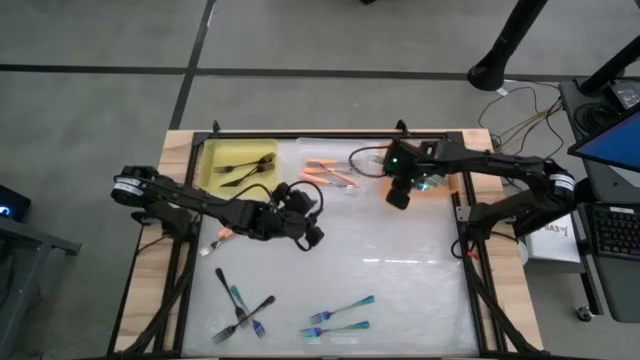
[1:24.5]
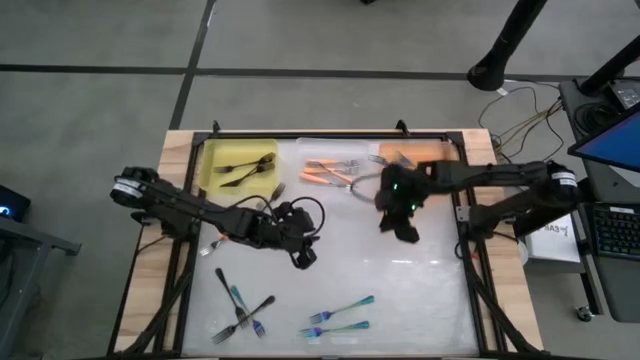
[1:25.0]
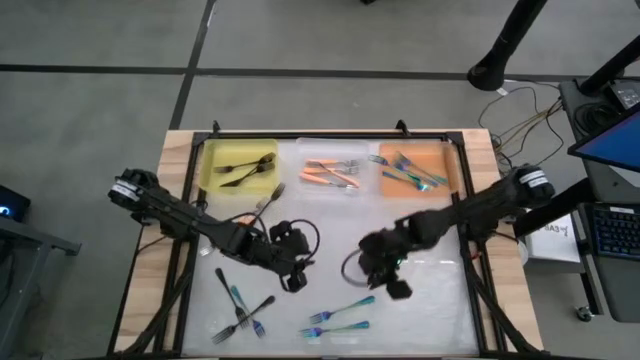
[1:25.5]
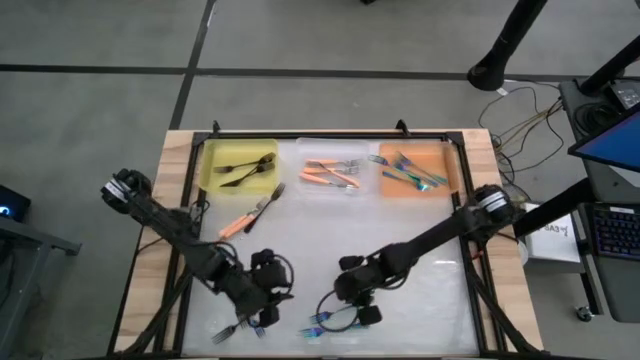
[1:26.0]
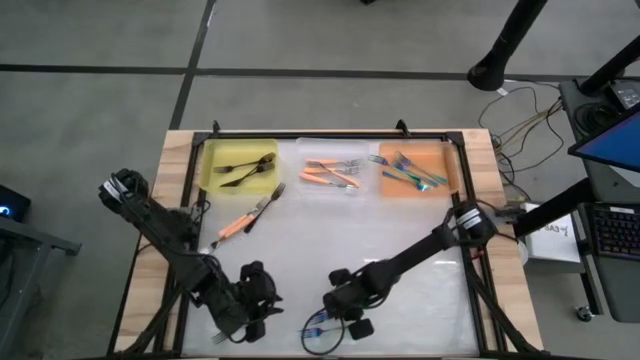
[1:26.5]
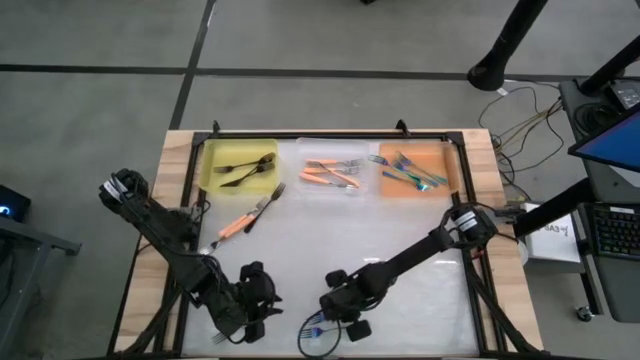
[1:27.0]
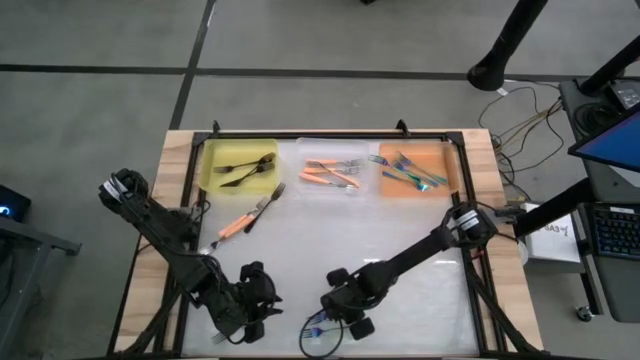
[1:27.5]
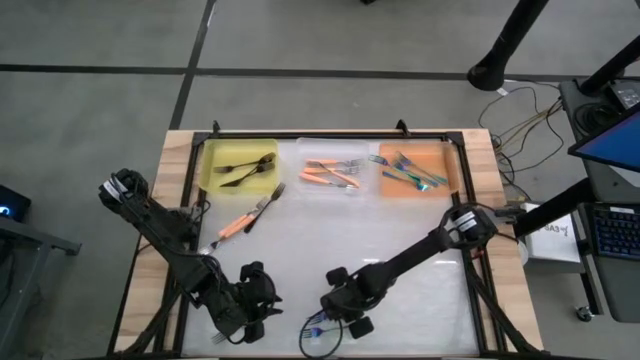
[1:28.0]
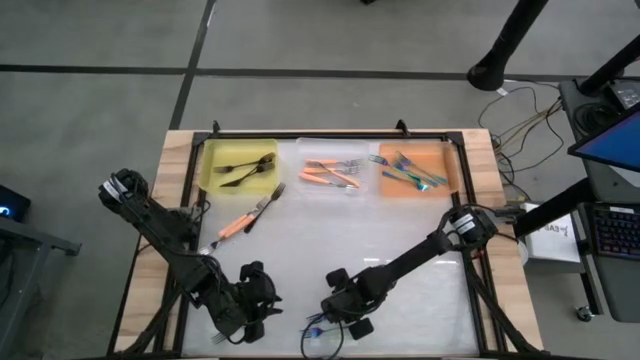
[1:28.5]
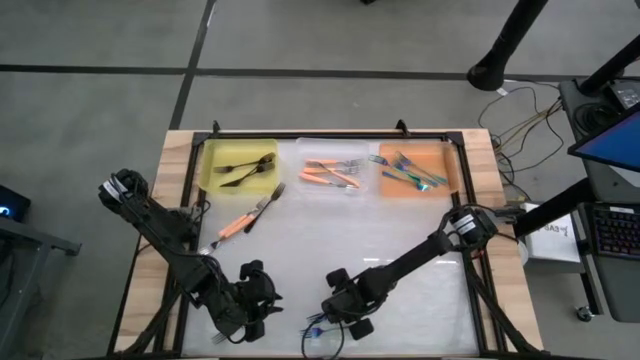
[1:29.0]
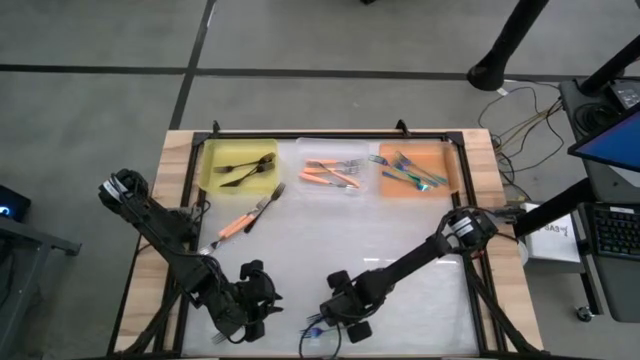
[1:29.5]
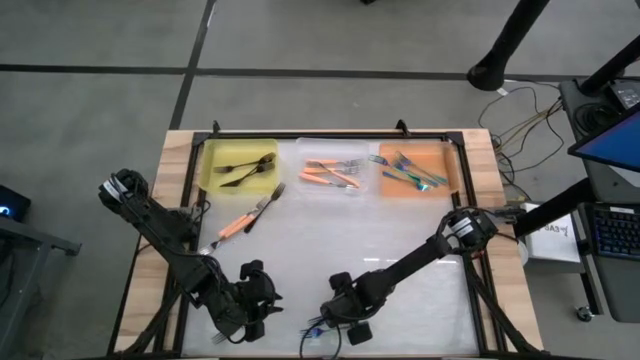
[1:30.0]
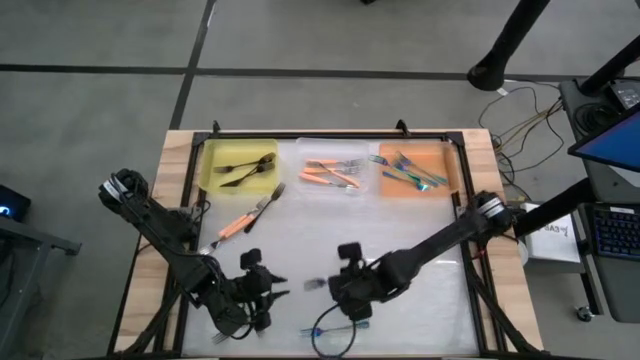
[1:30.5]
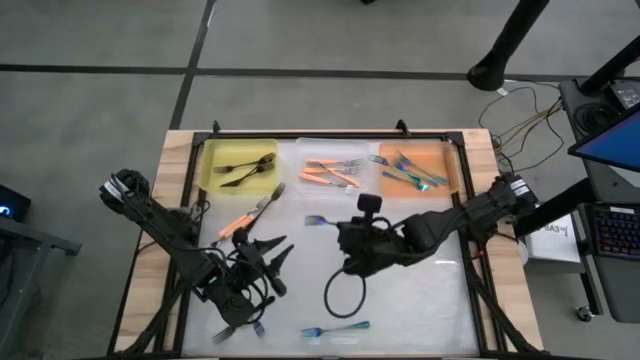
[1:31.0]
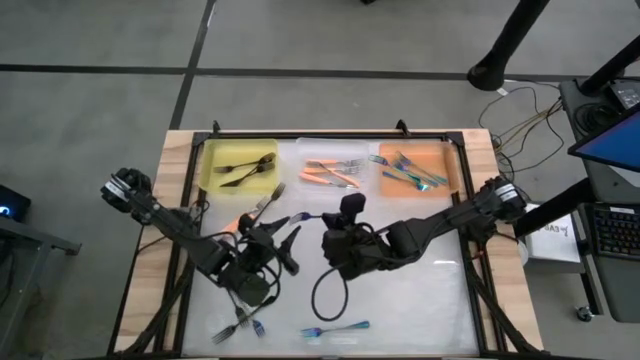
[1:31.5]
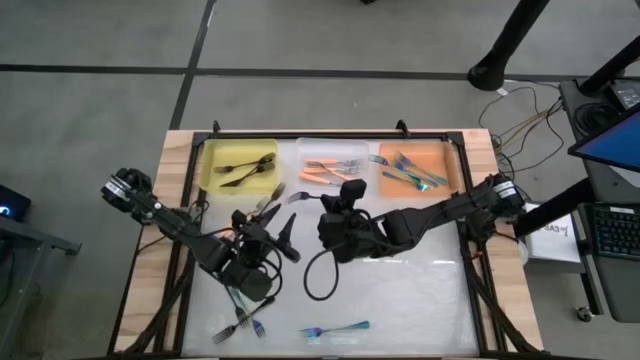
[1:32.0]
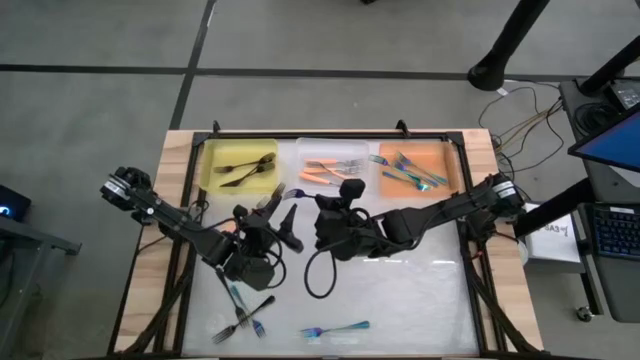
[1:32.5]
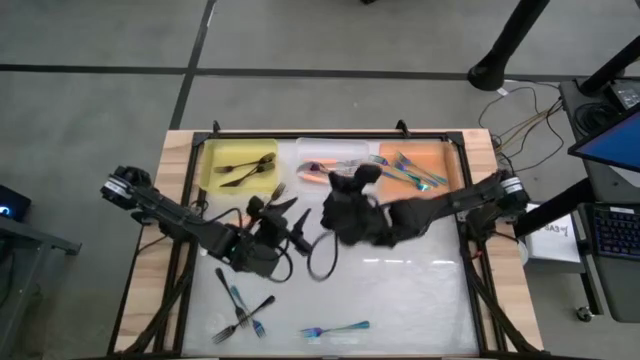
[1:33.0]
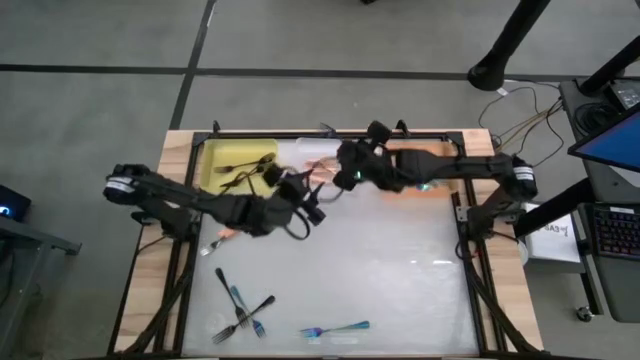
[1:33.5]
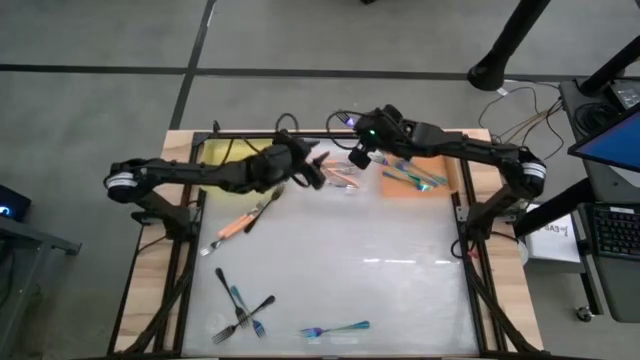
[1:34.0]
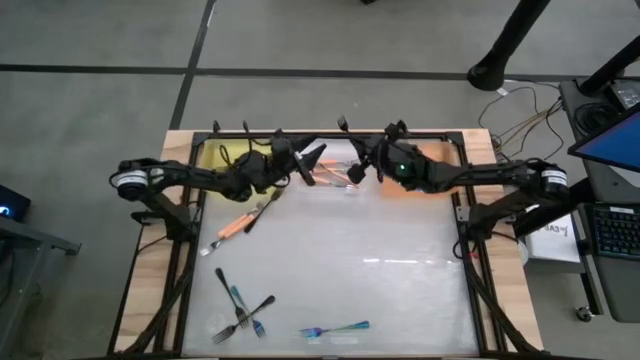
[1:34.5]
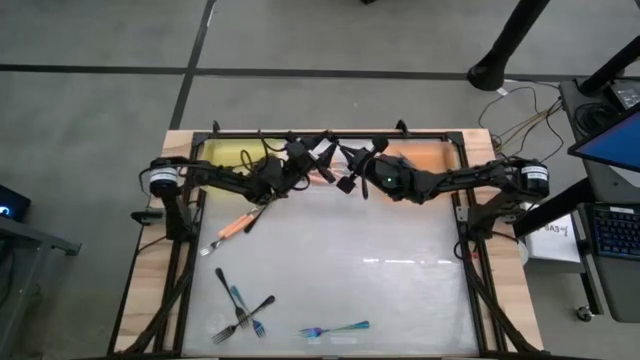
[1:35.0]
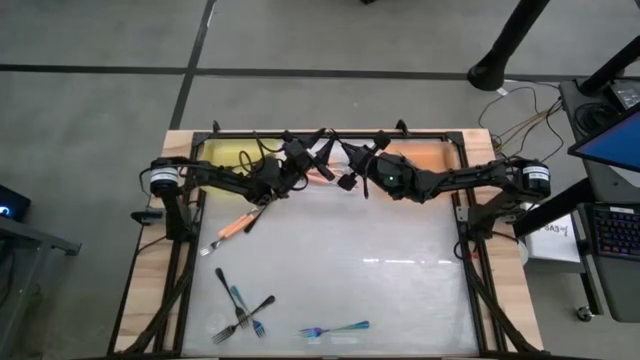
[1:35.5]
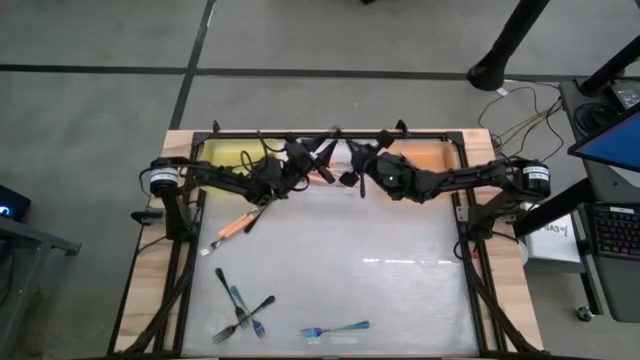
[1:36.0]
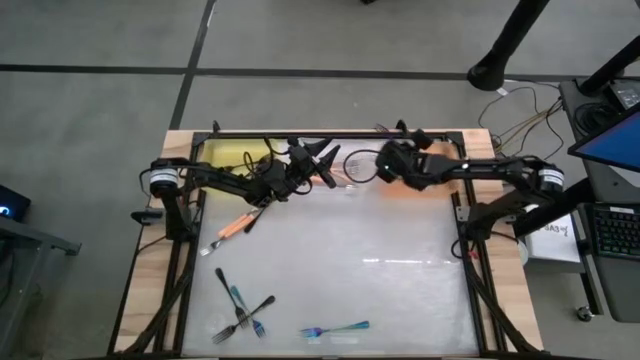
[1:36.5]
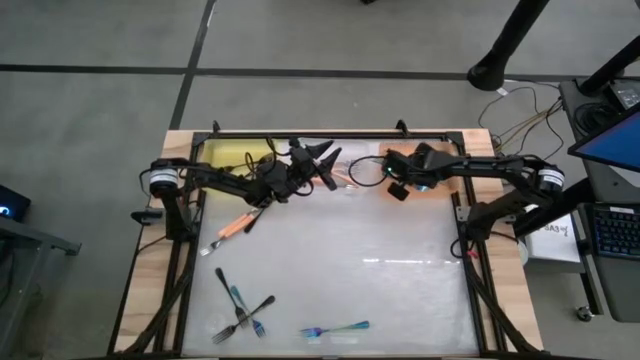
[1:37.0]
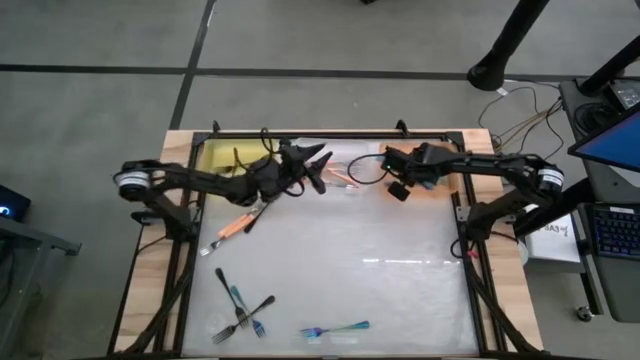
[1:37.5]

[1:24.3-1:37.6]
Task: Sort silverware by color (type)
Put the iridescent fork into the orange bin

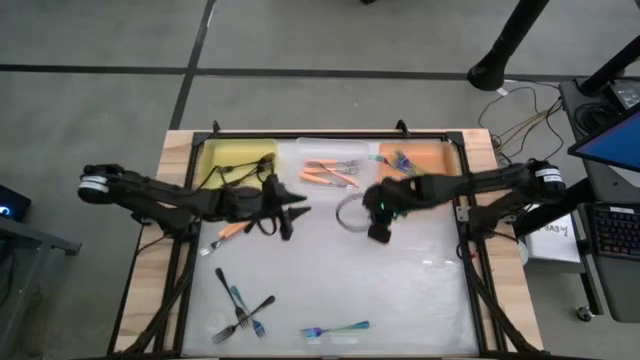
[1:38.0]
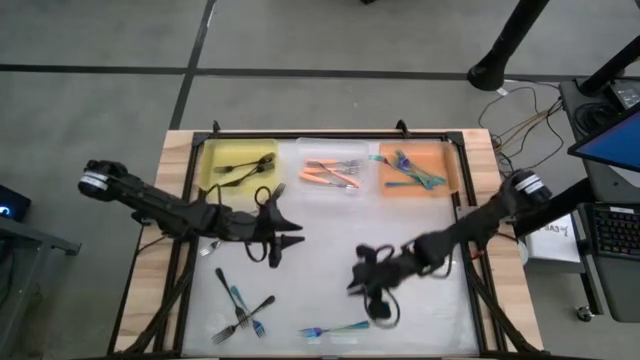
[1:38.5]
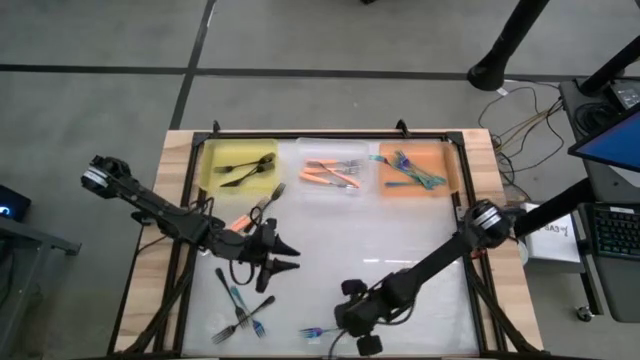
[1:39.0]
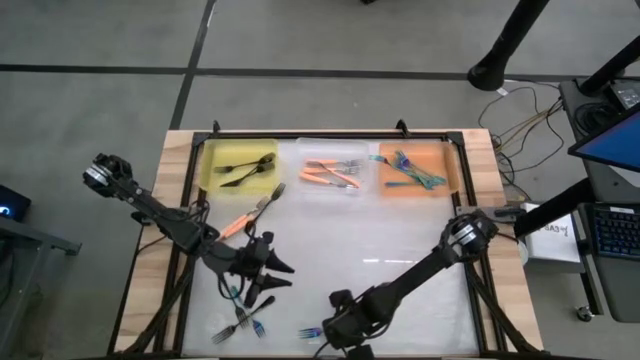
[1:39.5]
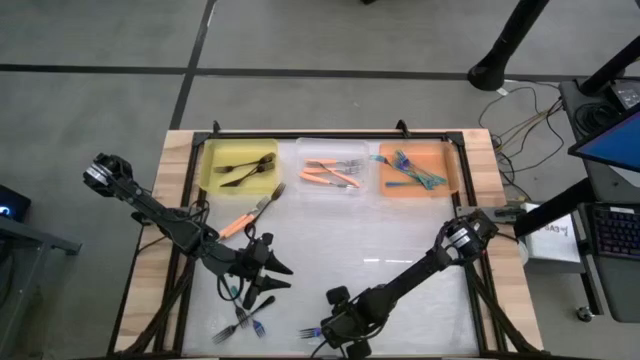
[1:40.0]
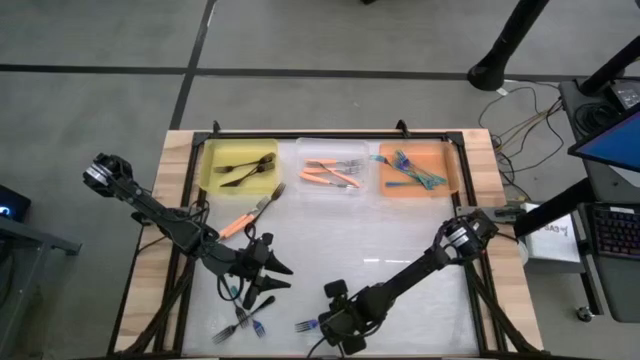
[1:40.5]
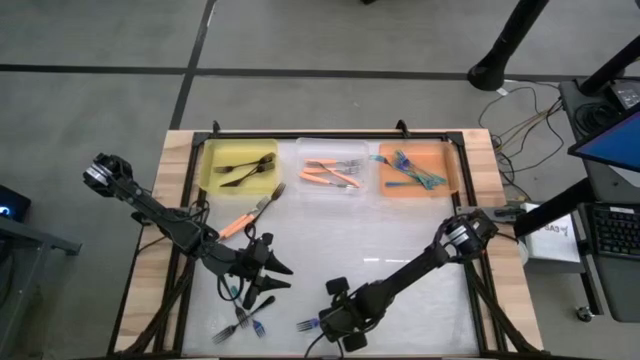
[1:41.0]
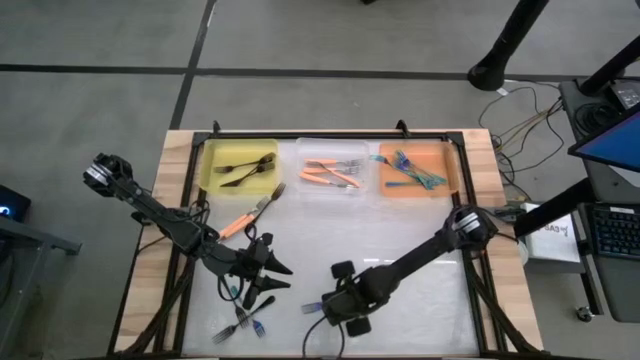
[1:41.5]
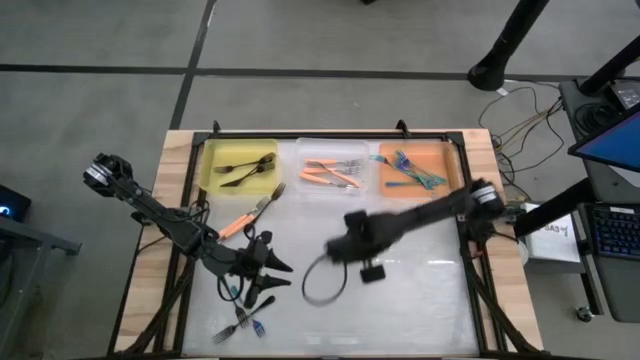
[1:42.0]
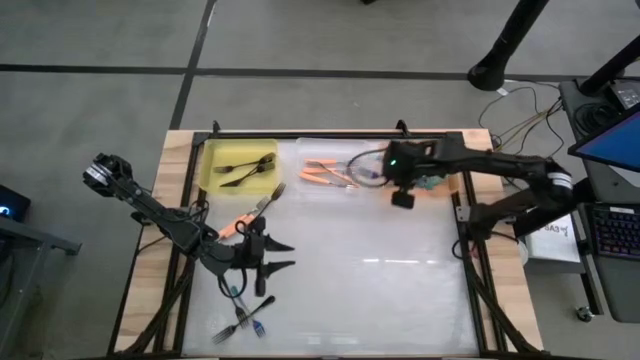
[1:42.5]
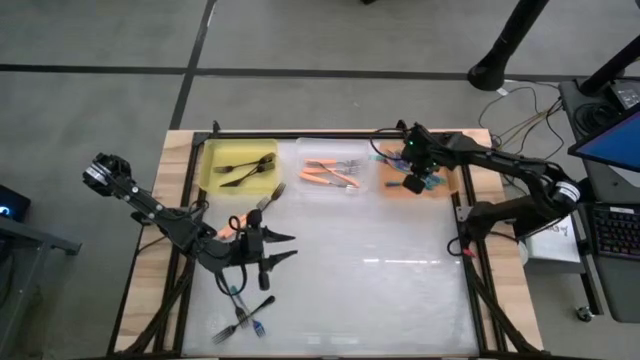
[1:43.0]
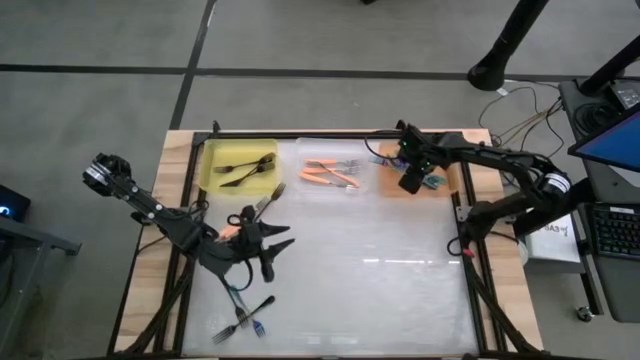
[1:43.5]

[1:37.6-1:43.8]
Put the iridescent fork into the orange bin

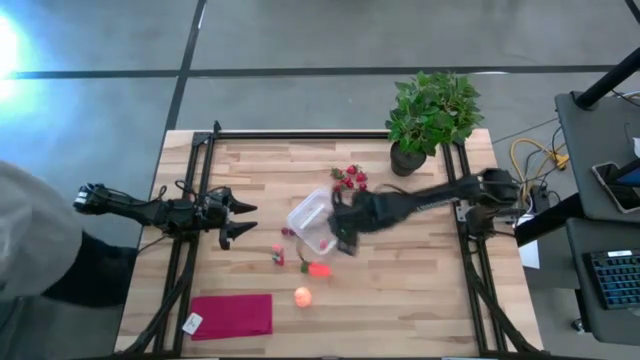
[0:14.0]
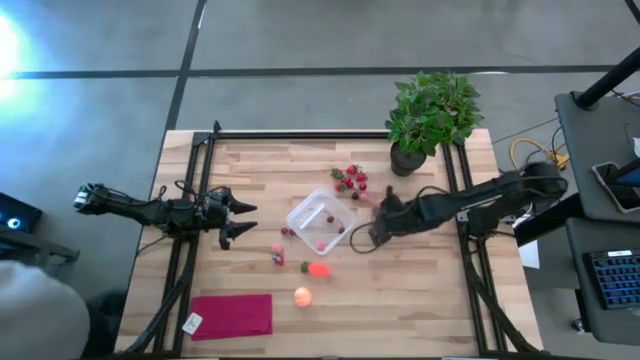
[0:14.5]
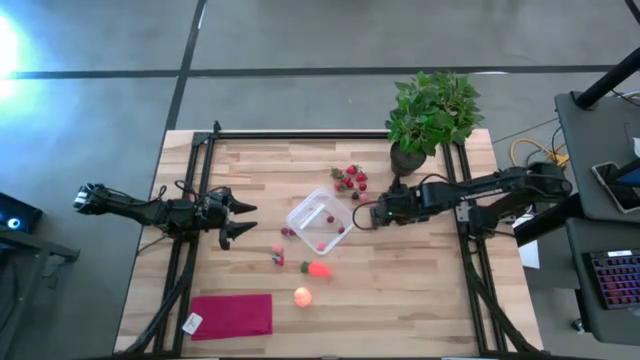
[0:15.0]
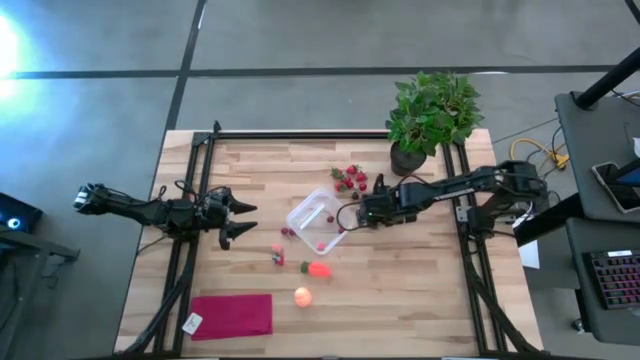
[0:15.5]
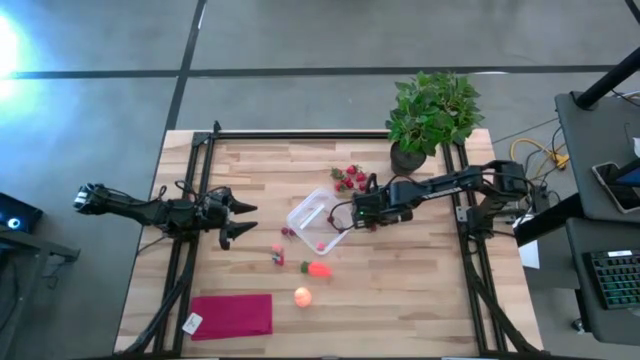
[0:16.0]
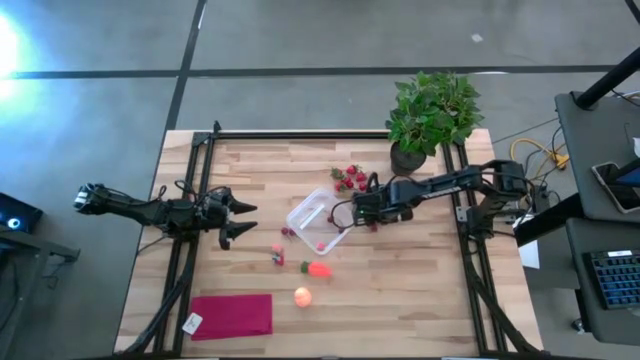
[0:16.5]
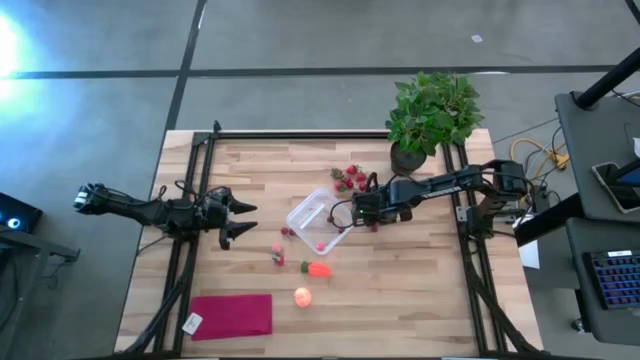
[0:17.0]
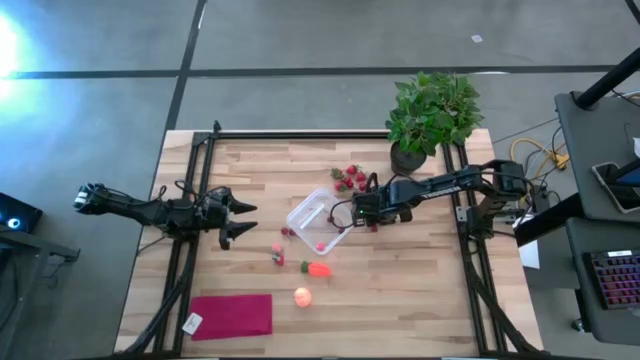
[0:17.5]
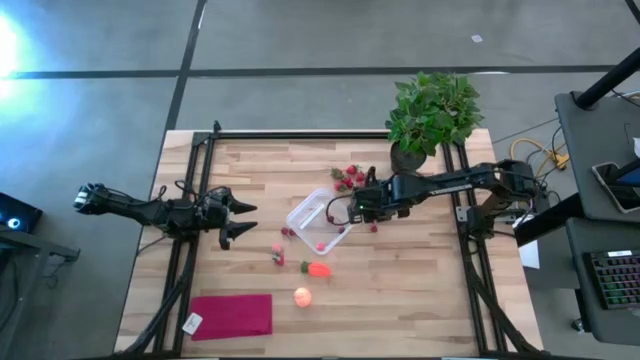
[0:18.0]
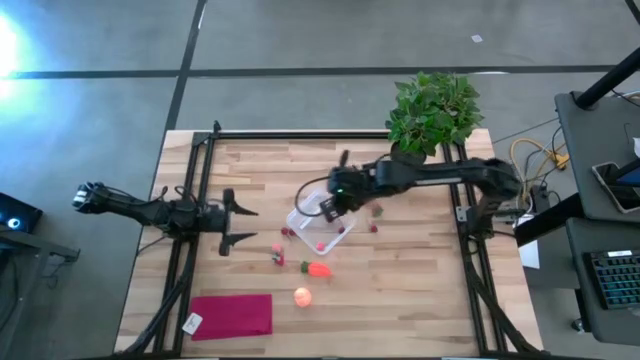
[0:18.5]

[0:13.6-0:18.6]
Task: Pick and placing Produce into tupperware
Put the red cherry into the transparent container
